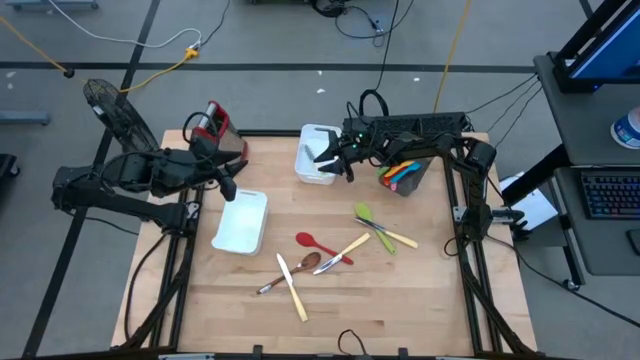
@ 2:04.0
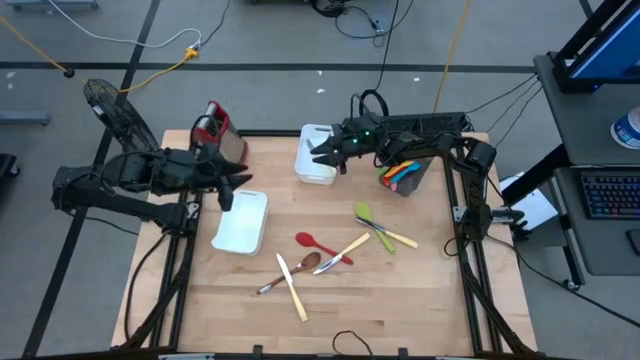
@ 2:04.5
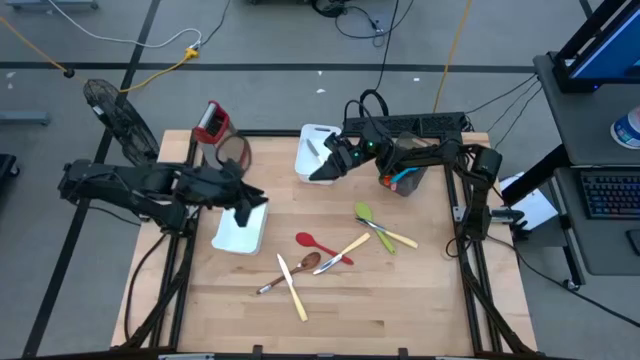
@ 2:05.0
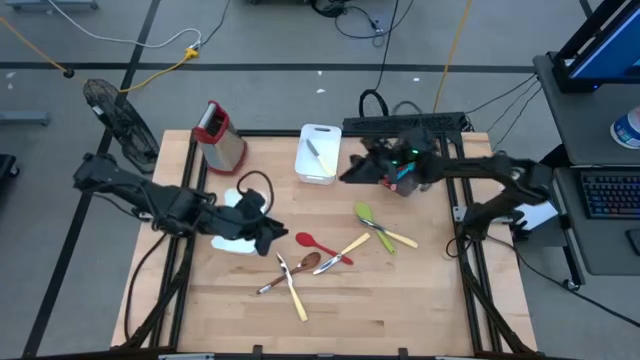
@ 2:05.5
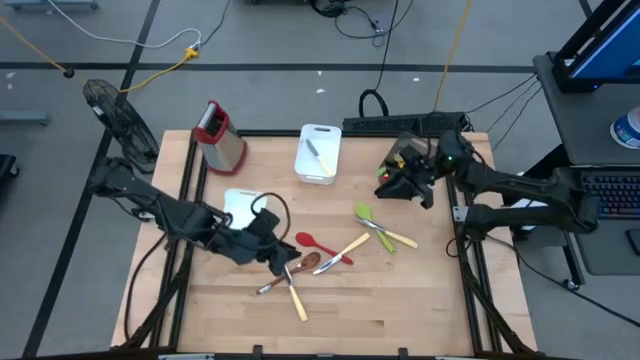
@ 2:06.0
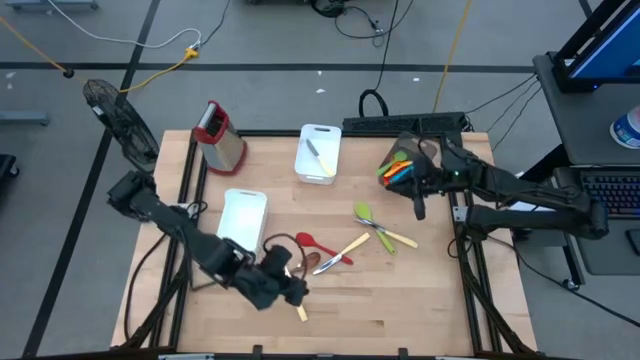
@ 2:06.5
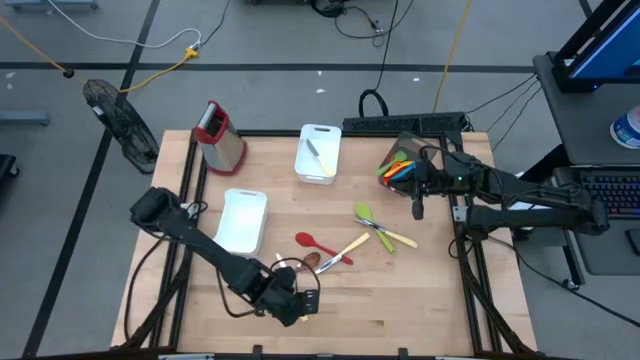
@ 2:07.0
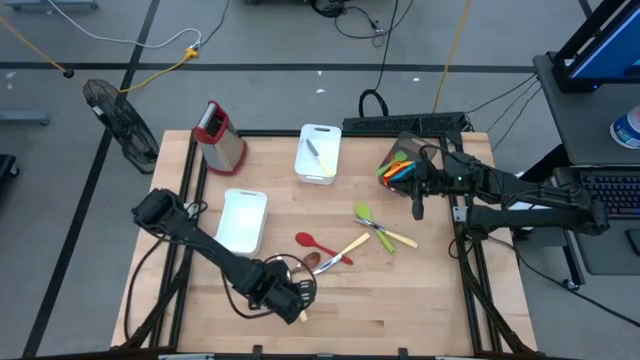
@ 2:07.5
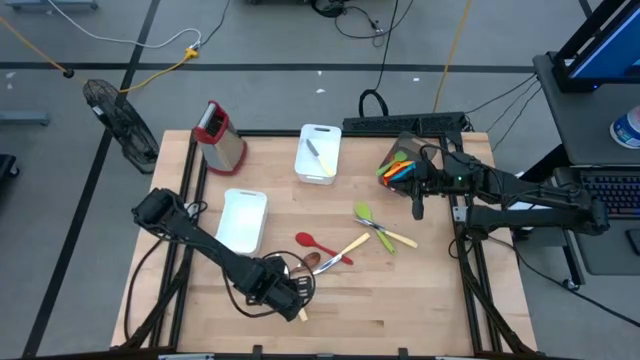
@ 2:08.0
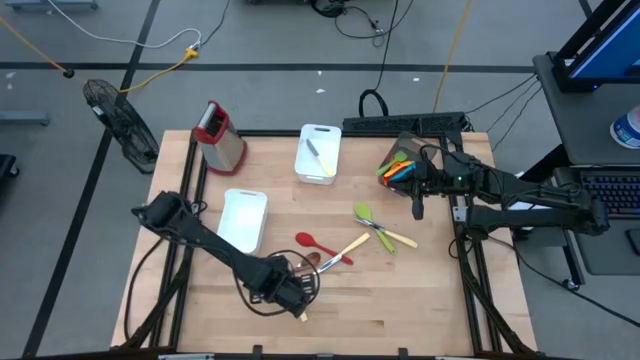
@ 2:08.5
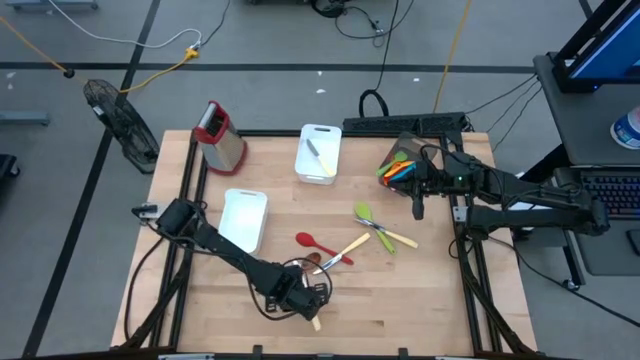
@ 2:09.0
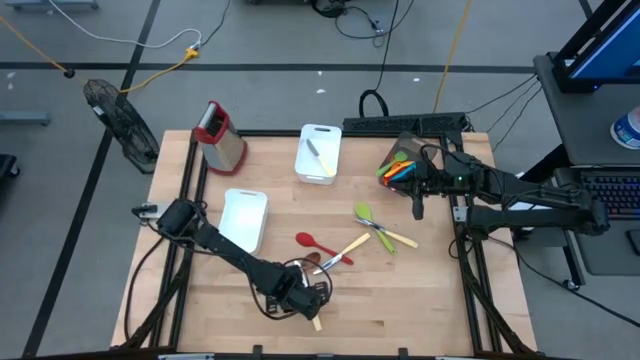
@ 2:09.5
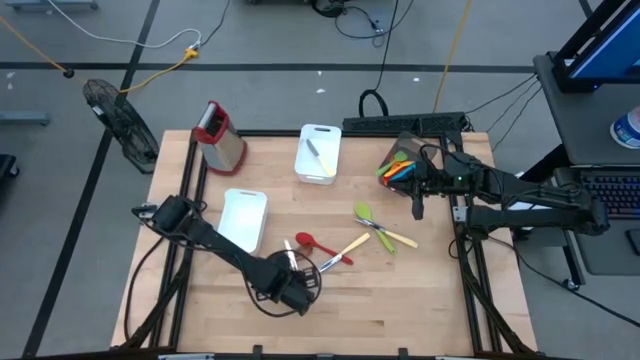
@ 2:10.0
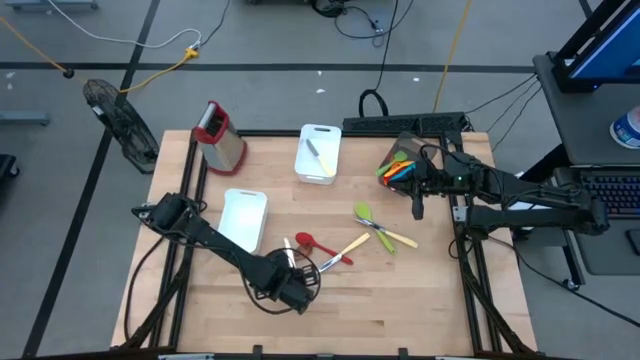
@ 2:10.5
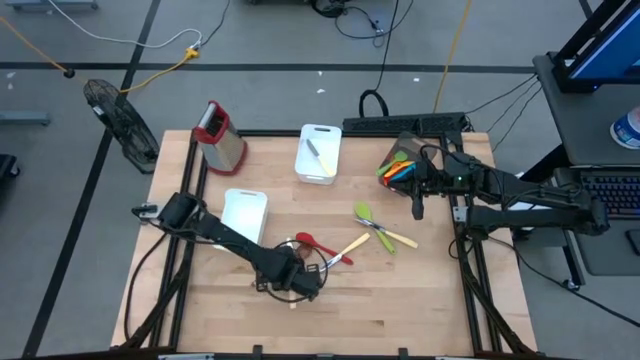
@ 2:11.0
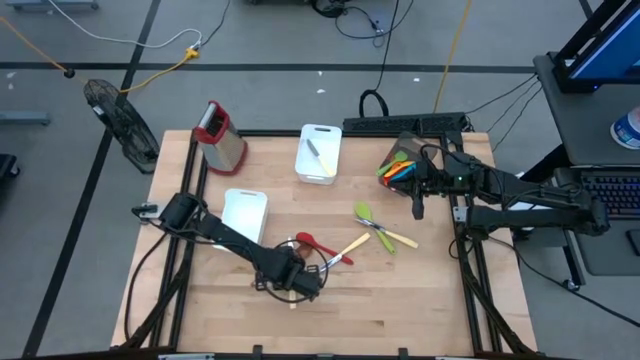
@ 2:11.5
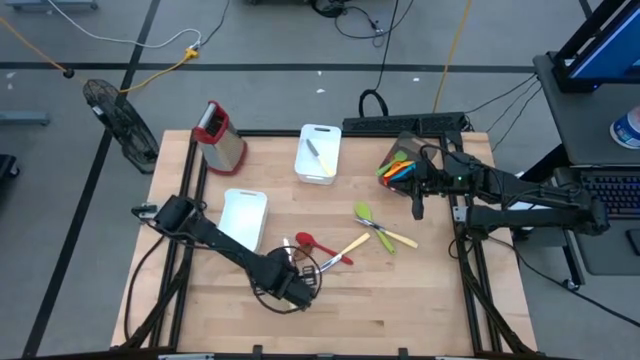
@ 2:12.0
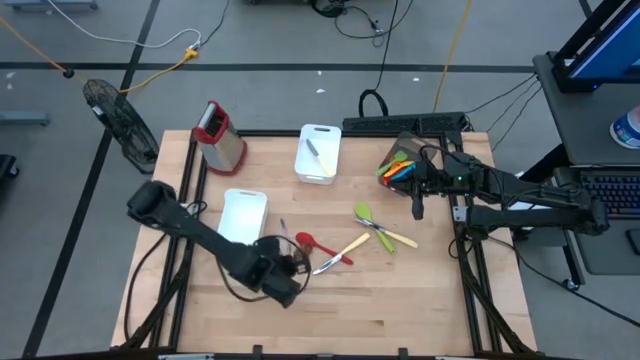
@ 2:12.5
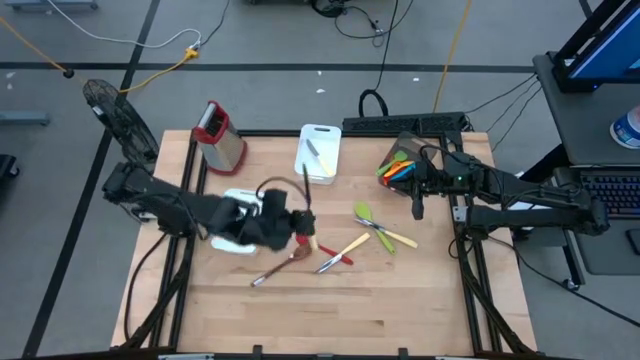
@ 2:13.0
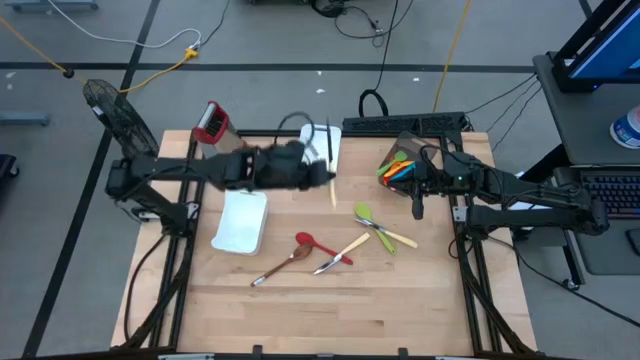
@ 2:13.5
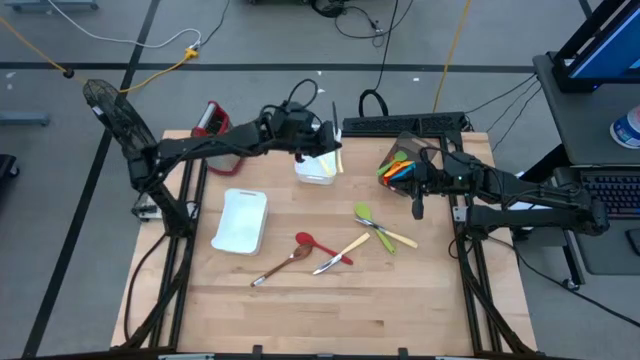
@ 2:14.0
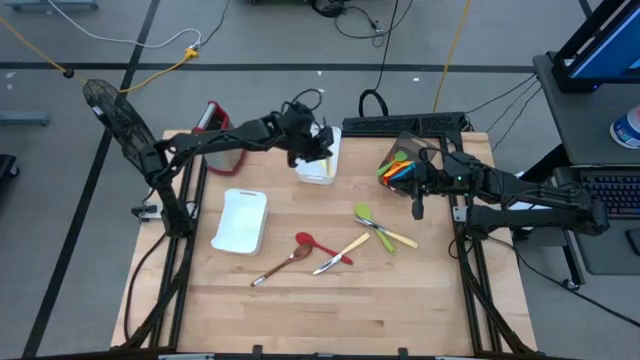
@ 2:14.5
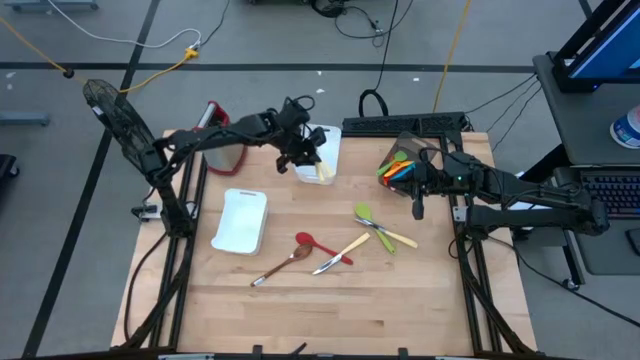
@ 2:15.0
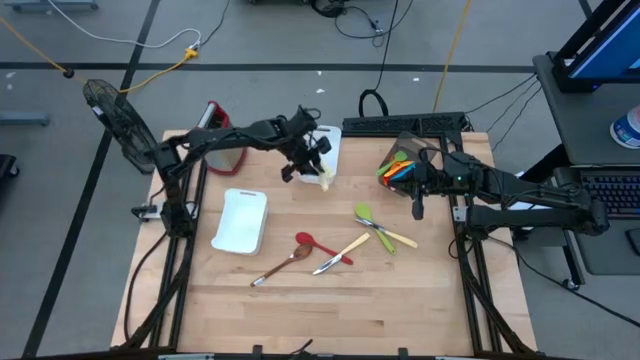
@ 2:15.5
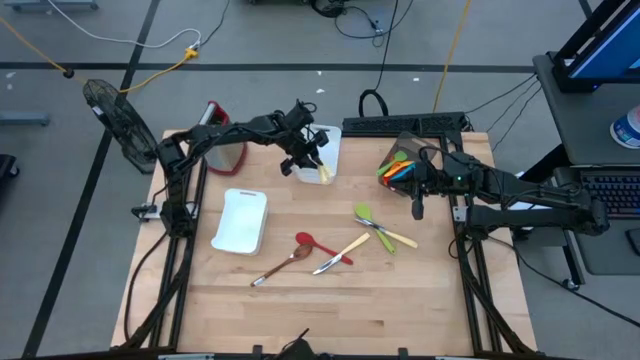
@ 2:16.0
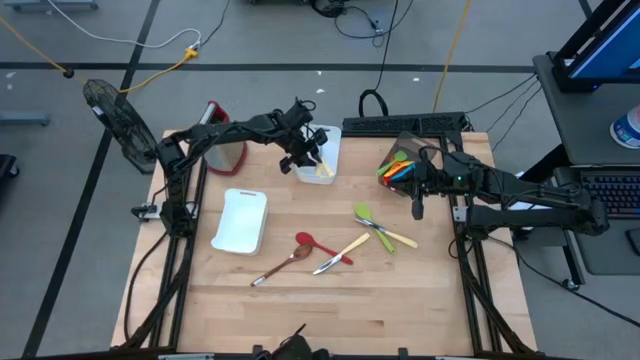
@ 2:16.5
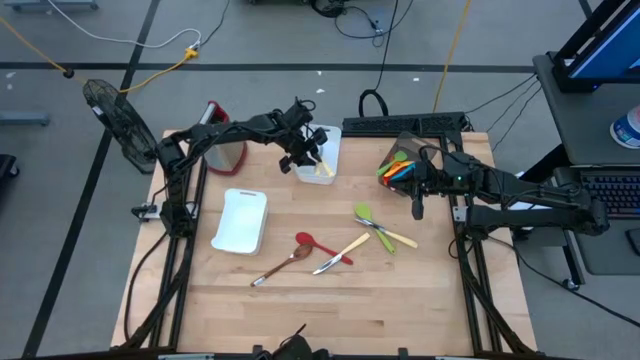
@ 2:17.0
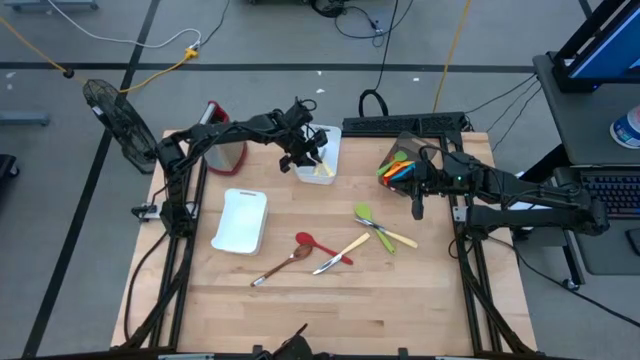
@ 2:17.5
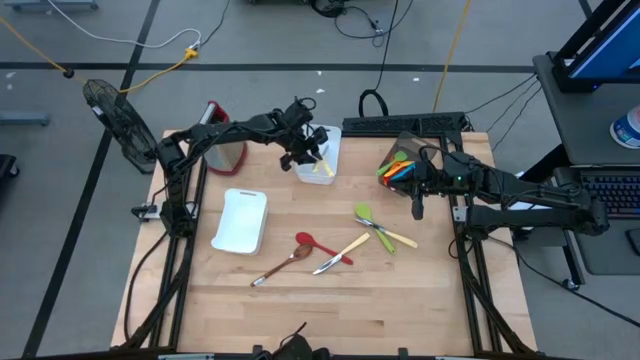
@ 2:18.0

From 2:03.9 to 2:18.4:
Task: Pick & Place Kitchen Items
Put the yellow table knife into the top white bin

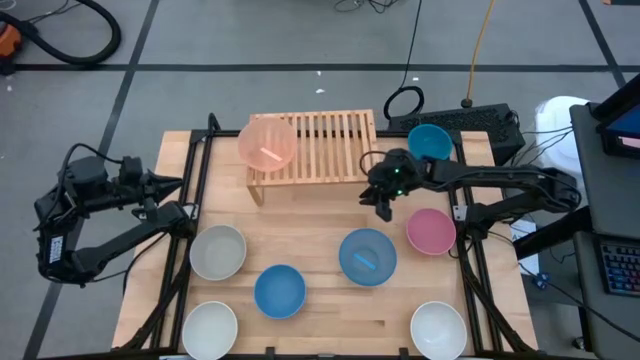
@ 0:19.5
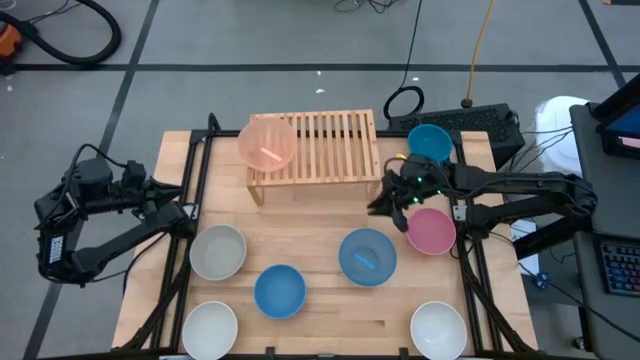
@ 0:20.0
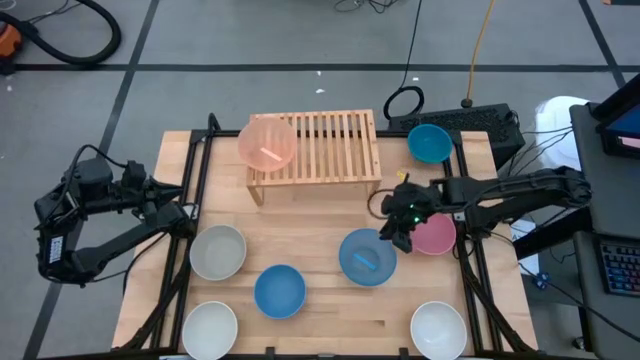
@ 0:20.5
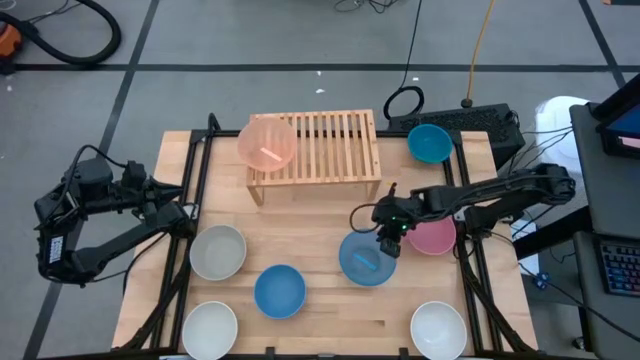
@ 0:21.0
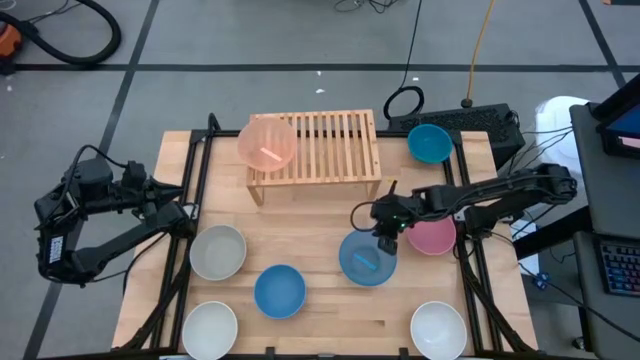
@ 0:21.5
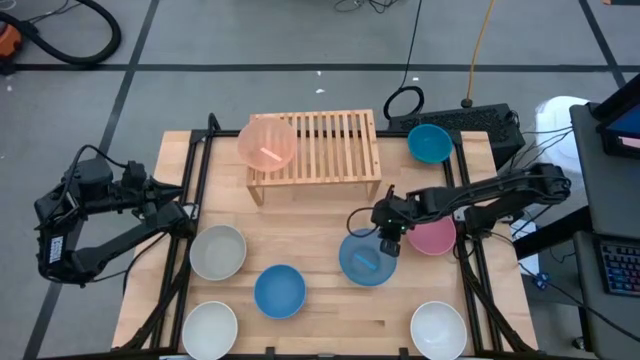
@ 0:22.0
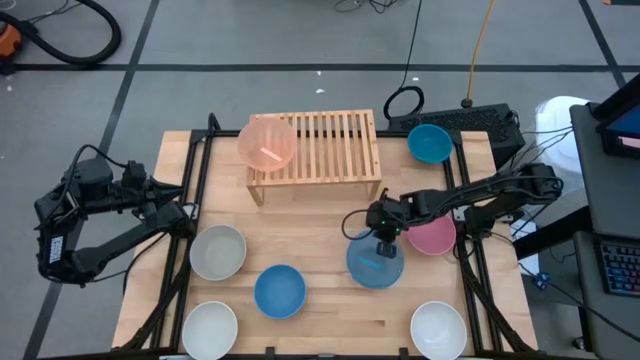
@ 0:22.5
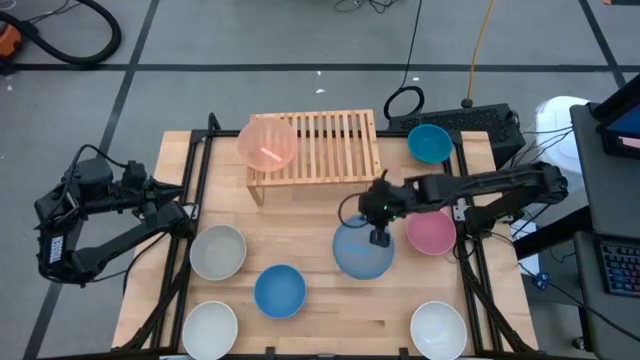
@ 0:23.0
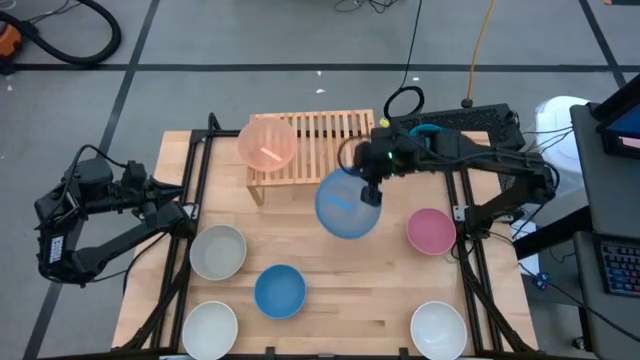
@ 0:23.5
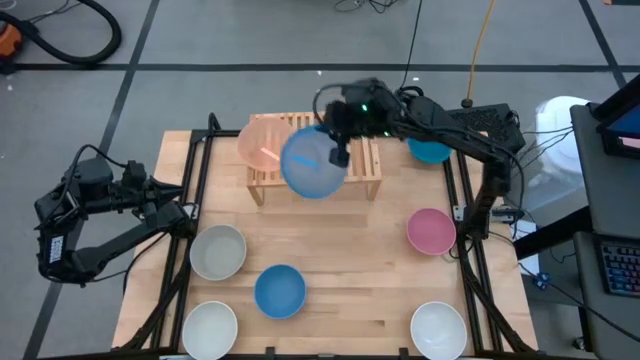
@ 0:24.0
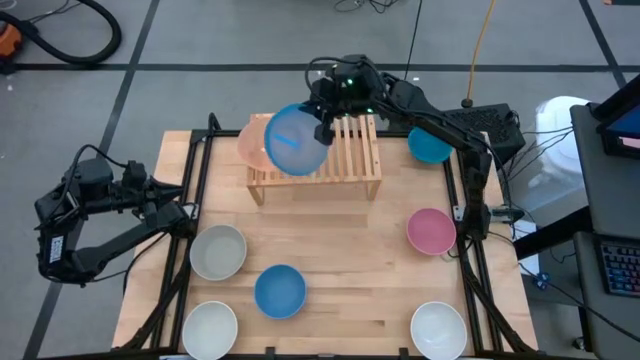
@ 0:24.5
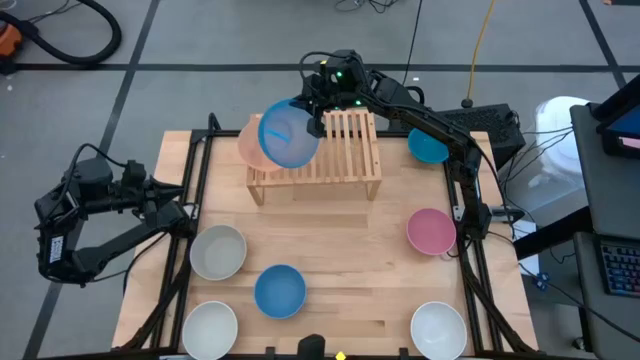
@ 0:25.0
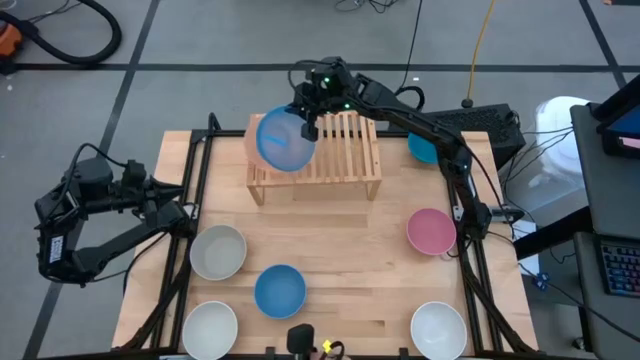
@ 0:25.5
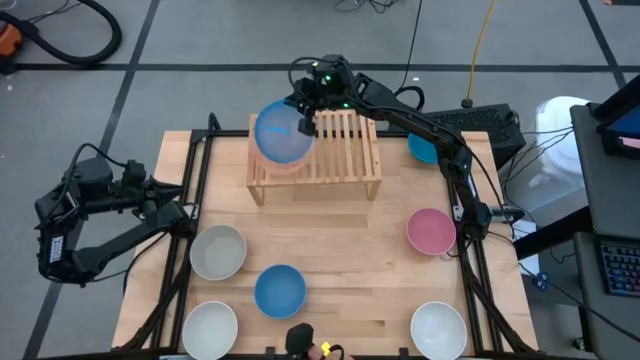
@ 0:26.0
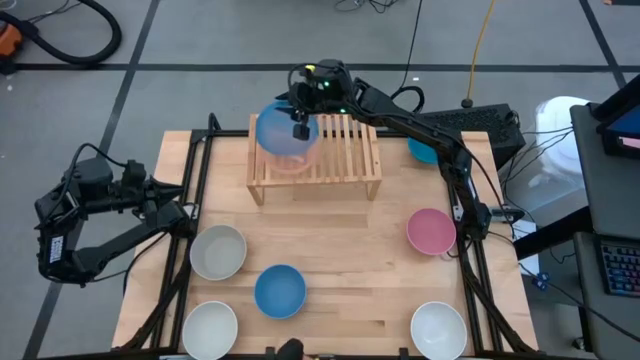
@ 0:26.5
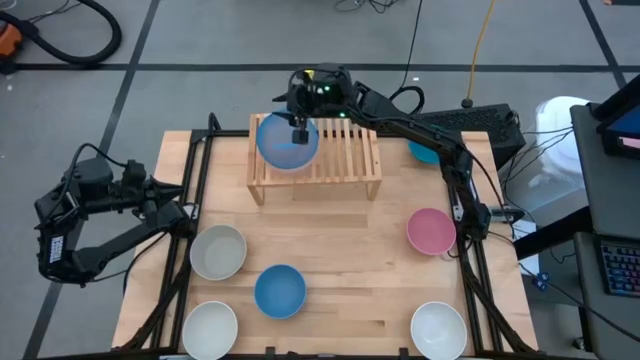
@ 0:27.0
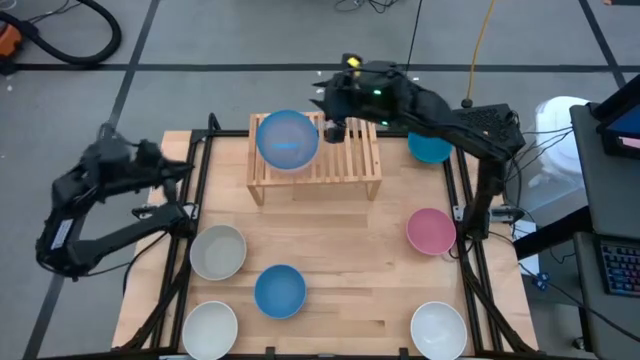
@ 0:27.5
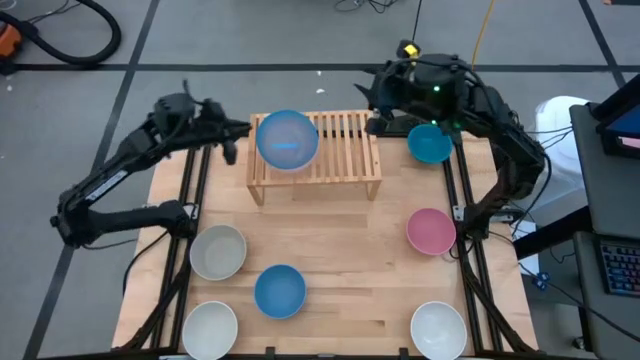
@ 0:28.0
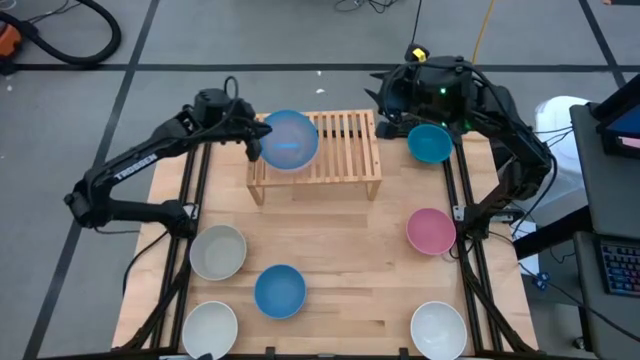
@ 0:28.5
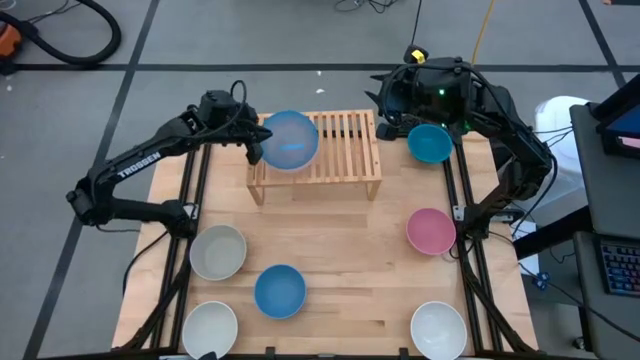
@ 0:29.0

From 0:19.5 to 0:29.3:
Task: Place and stack bowls onto a shelf
Stack the middle blue bowl on top of the orange bowl on the shelf
